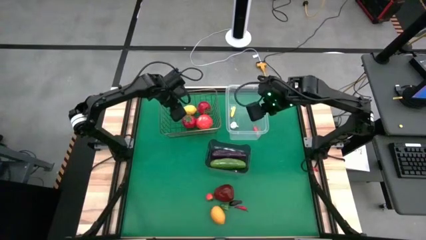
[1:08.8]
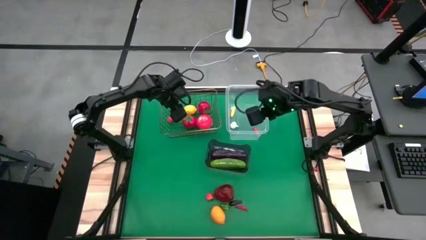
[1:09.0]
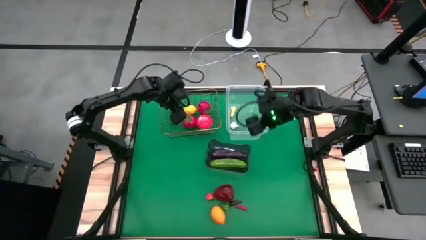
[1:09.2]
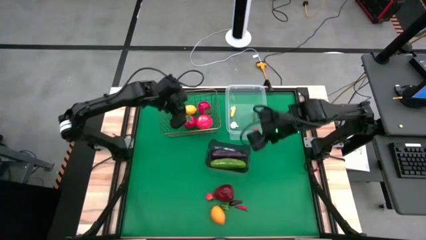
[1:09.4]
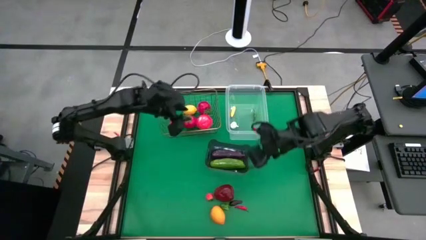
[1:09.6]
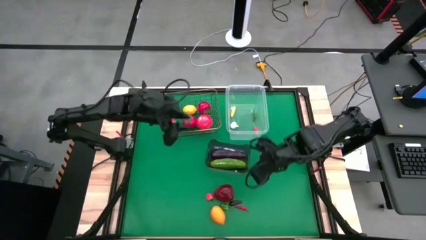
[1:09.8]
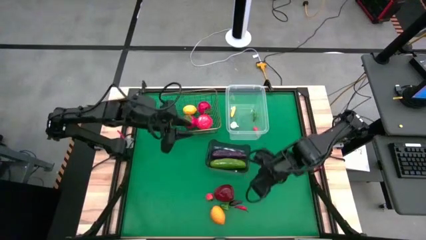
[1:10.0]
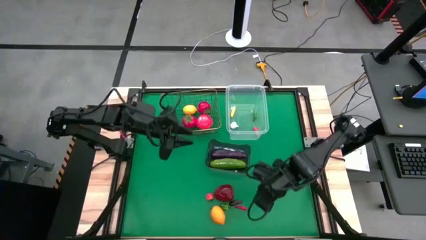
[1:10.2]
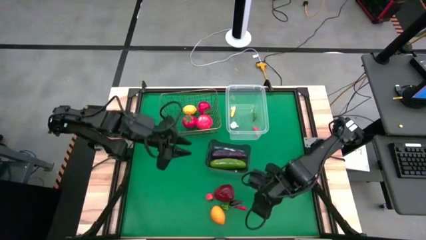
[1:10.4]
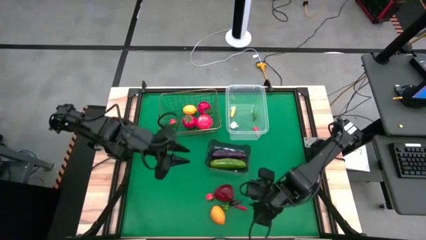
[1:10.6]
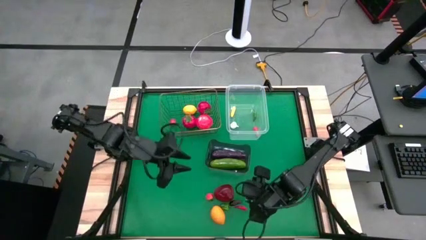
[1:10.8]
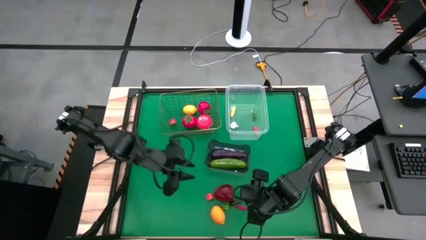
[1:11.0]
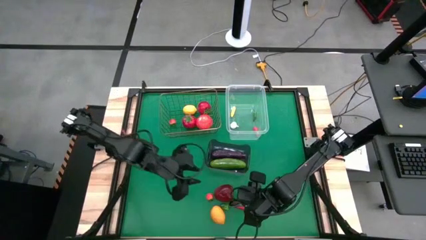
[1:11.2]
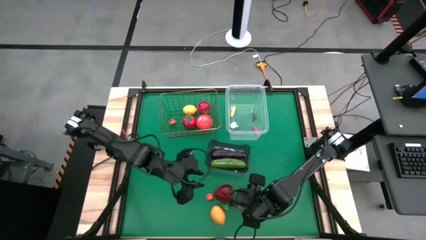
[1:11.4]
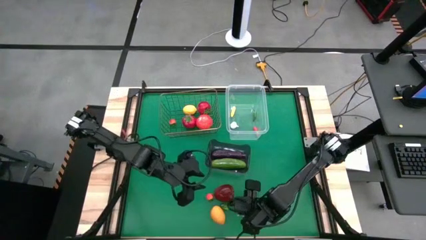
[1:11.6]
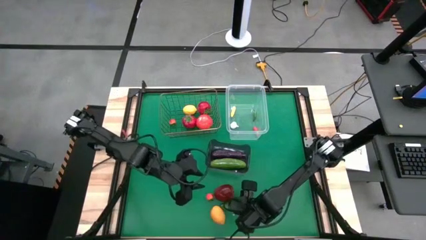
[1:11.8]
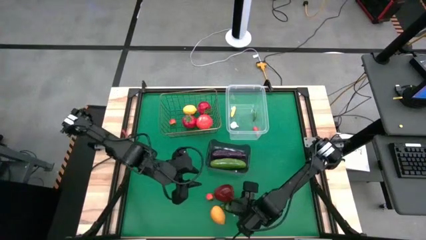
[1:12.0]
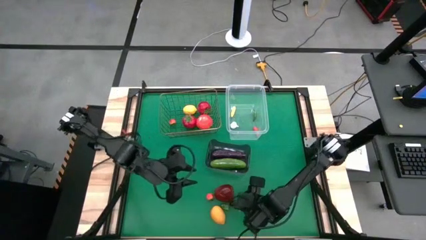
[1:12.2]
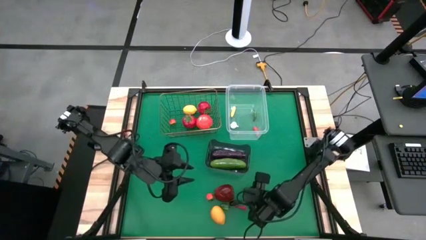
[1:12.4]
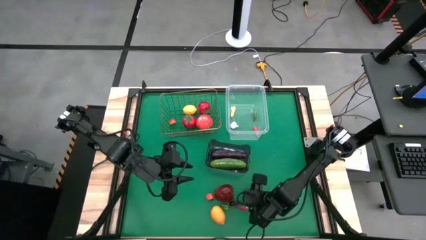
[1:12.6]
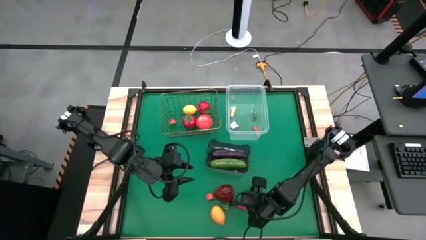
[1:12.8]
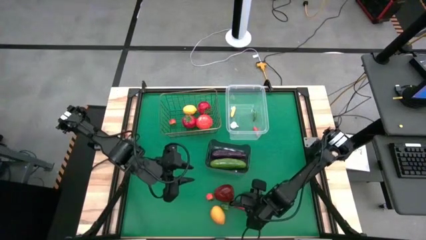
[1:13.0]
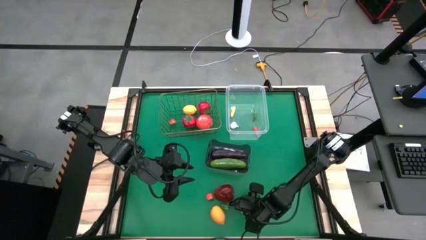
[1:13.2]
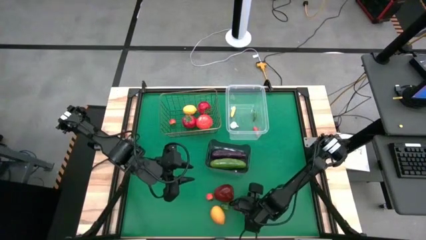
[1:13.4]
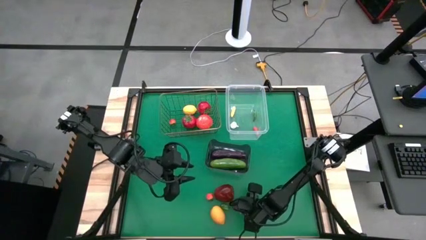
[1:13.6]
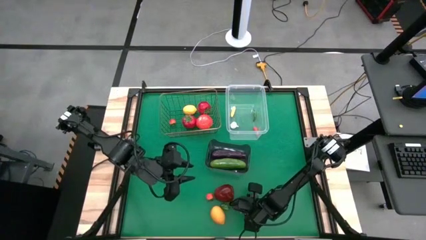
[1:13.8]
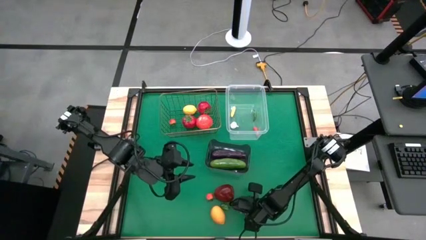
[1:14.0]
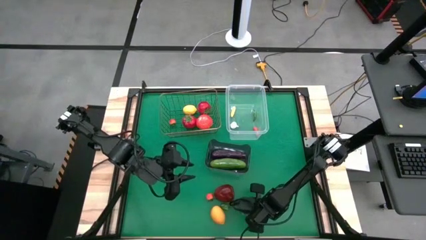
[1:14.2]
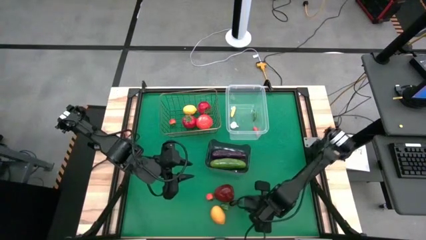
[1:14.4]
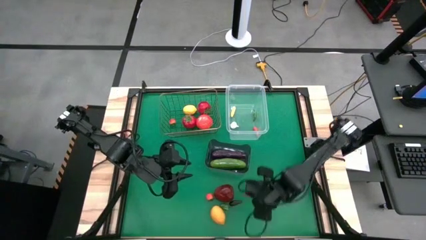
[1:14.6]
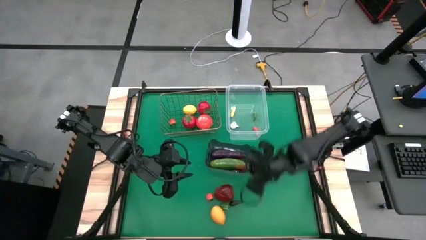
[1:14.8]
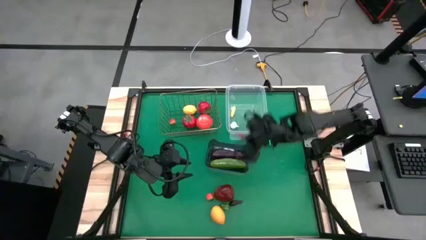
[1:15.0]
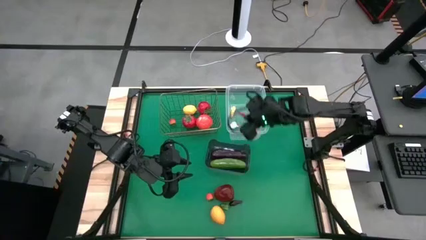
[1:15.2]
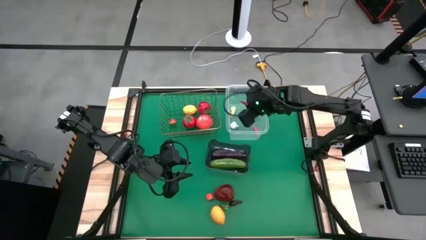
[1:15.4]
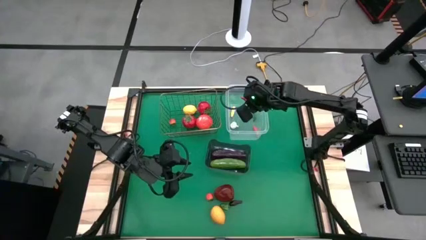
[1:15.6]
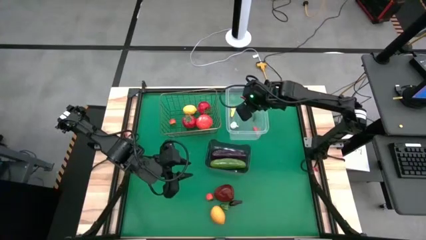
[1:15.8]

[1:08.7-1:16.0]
Task: Sort produce into baskets
Put the red chili pepper into the transparent bin

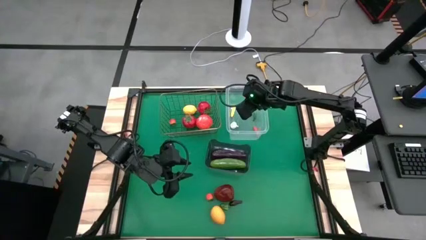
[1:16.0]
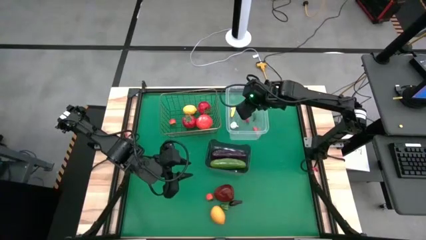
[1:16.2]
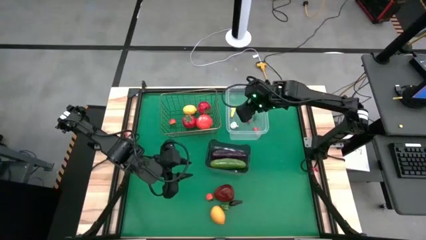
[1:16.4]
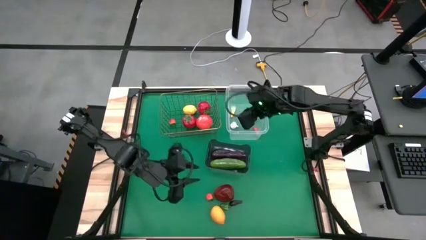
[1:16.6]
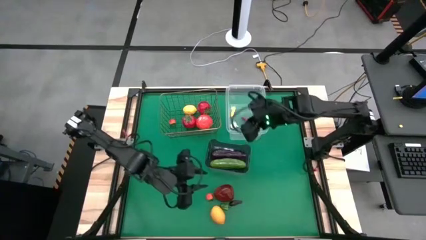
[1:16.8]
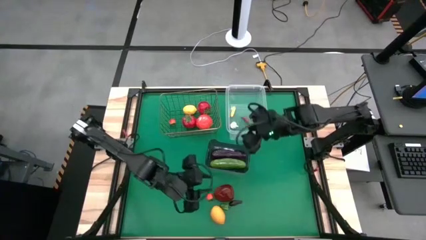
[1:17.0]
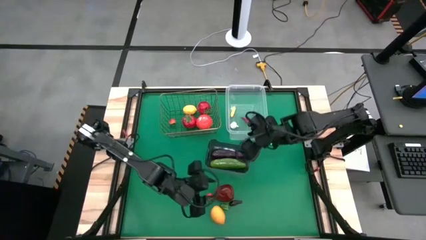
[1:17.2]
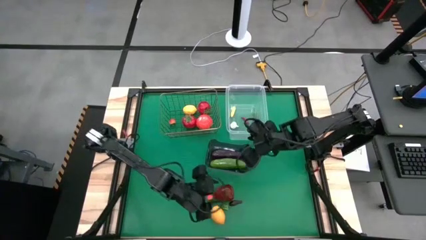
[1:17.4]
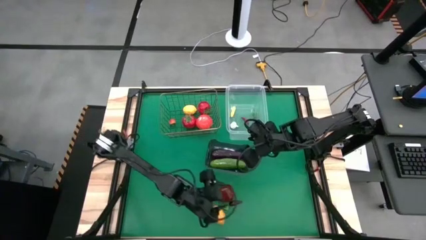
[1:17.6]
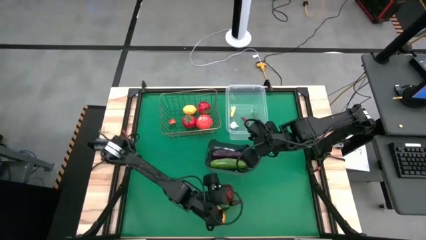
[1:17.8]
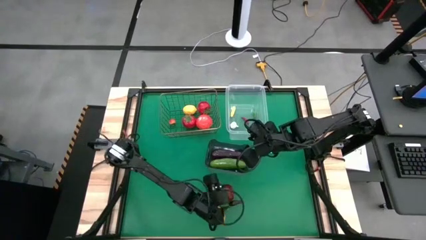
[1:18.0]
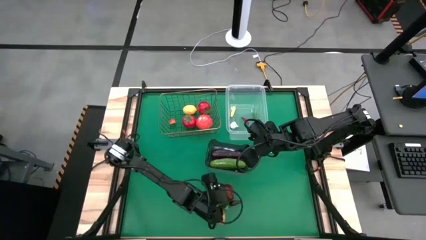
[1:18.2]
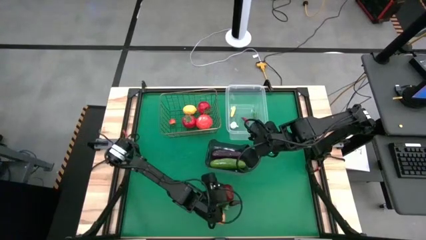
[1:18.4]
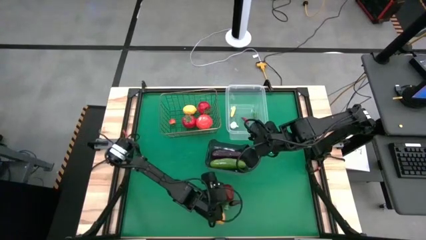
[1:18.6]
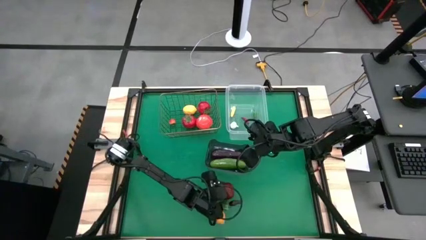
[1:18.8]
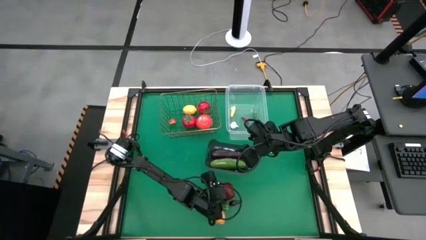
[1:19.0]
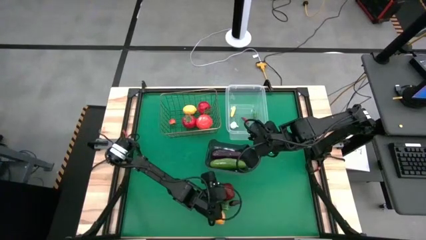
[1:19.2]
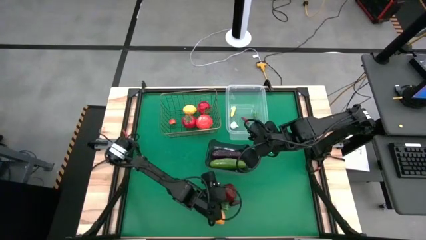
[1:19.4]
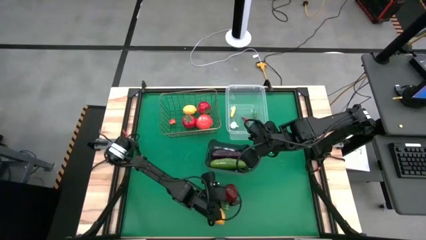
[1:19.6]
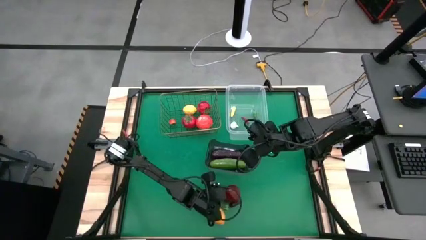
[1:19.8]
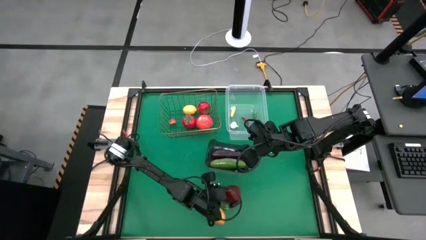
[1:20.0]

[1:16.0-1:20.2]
Put the apple into the wire basket

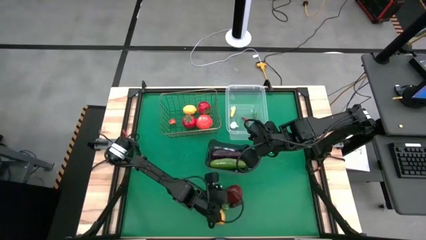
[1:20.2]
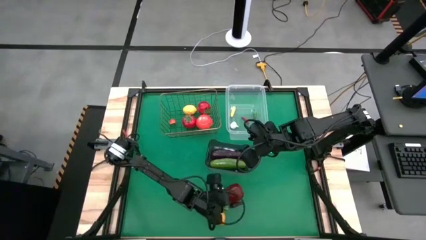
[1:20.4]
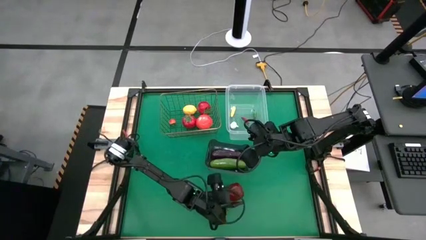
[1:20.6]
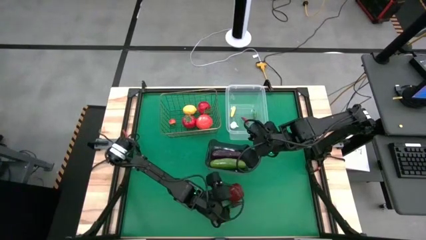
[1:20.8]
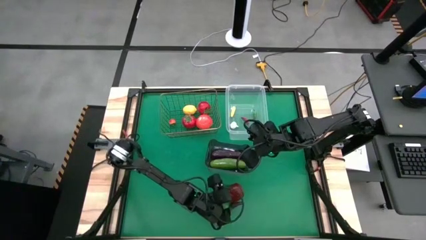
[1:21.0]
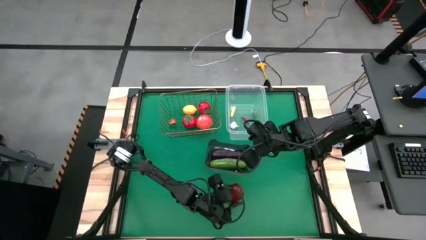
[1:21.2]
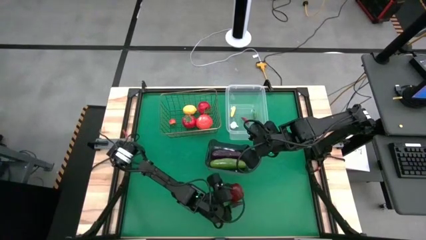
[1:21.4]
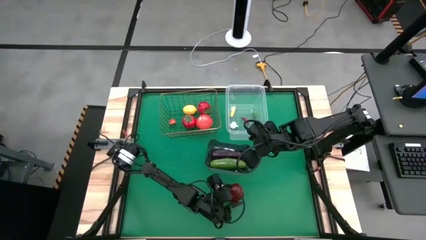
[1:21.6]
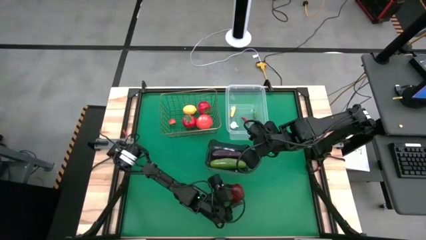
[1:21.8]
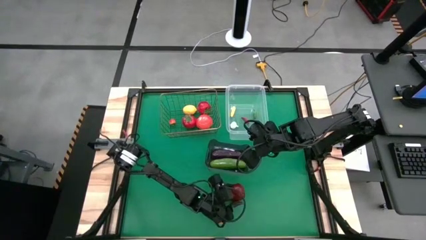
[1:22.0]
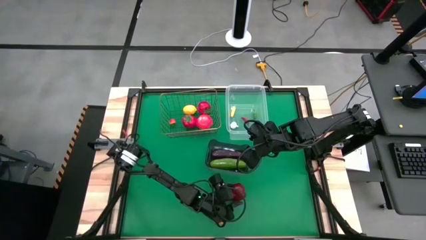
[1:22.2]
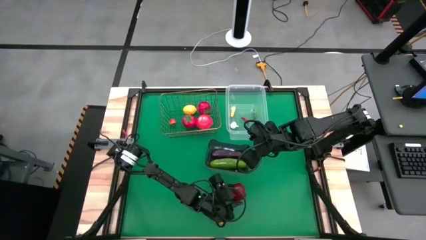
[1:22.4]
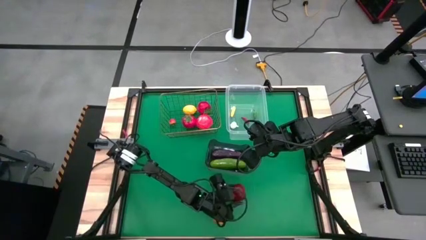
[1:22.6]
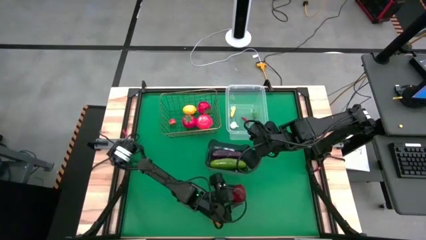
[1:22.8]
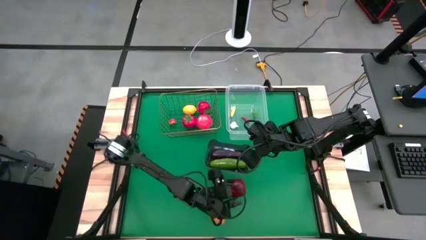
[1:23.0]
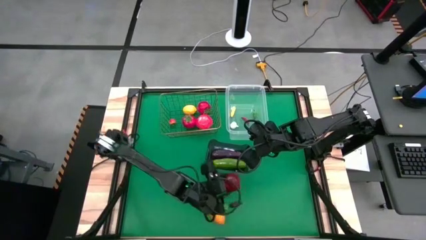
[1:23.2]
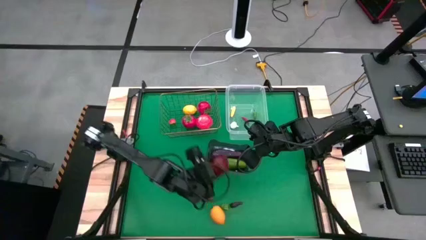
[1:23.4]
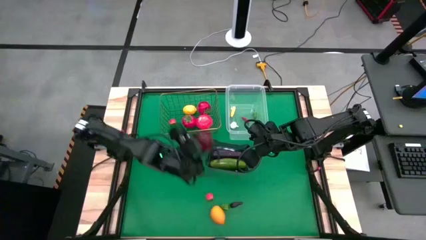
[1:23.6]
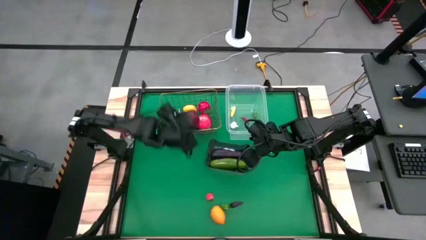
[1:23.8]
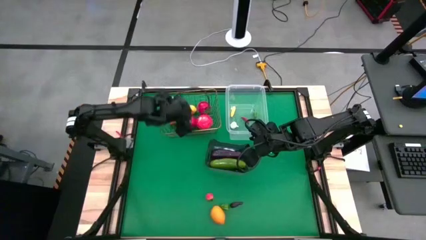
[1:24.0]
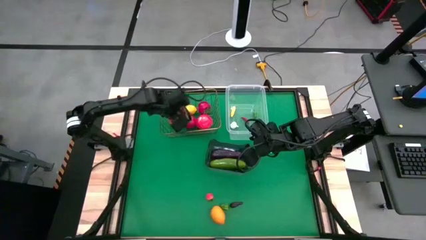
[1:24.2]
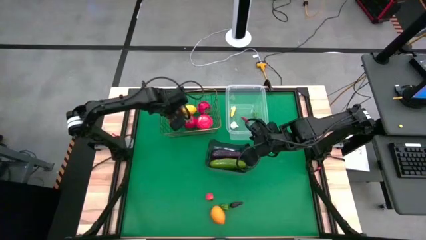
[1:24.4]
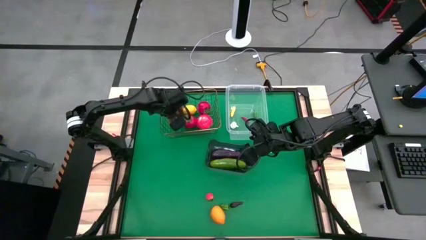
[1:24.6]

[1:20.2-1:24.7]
Put the apple into the wire basket
